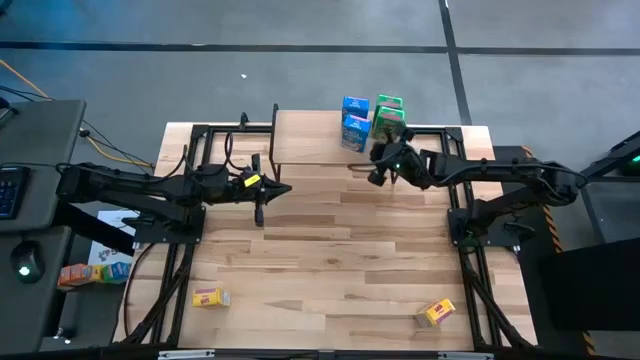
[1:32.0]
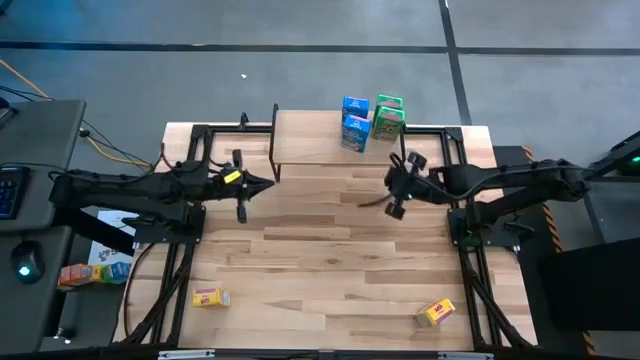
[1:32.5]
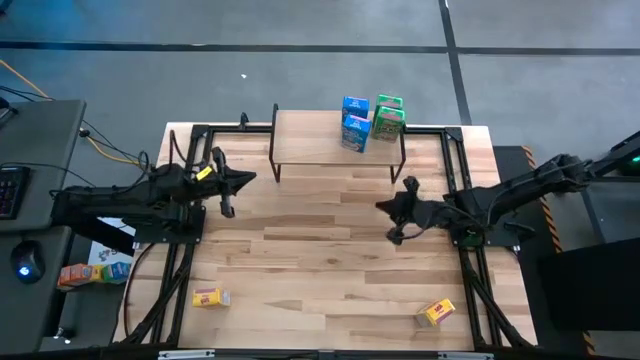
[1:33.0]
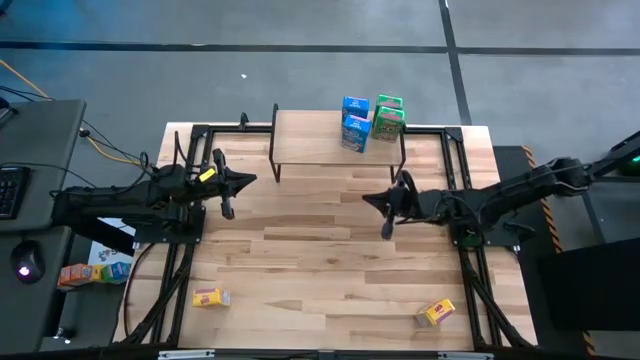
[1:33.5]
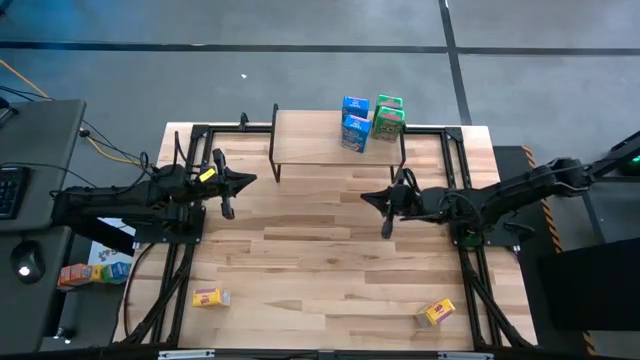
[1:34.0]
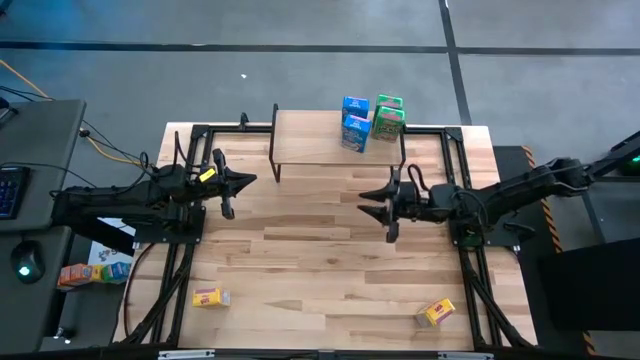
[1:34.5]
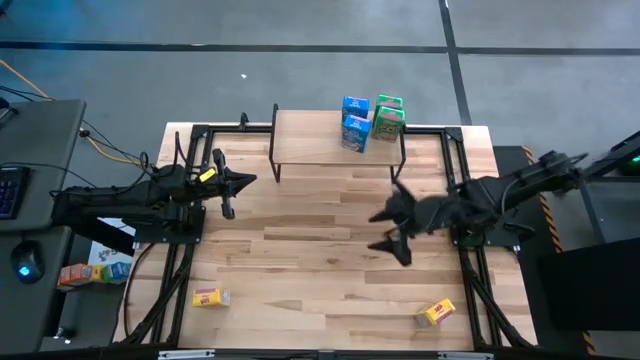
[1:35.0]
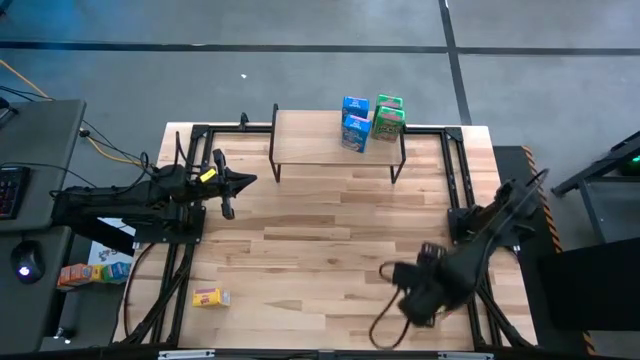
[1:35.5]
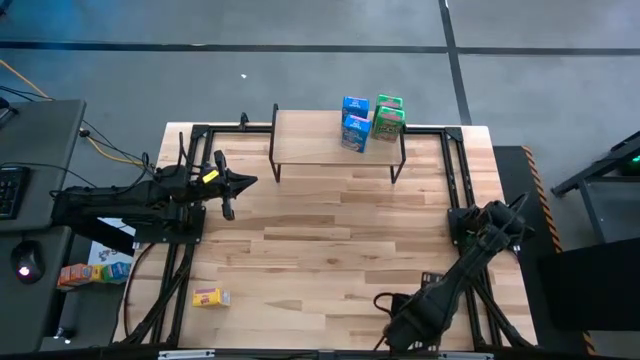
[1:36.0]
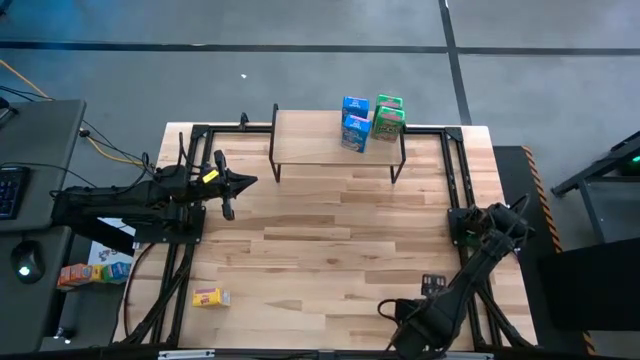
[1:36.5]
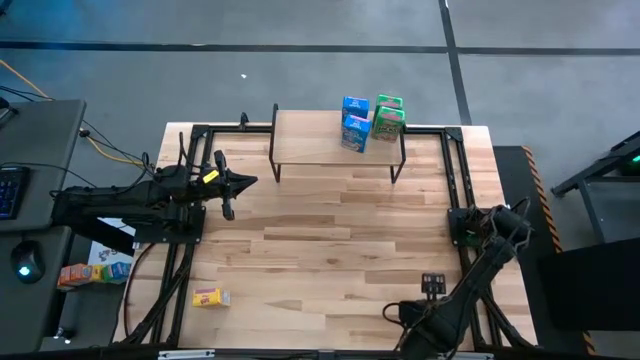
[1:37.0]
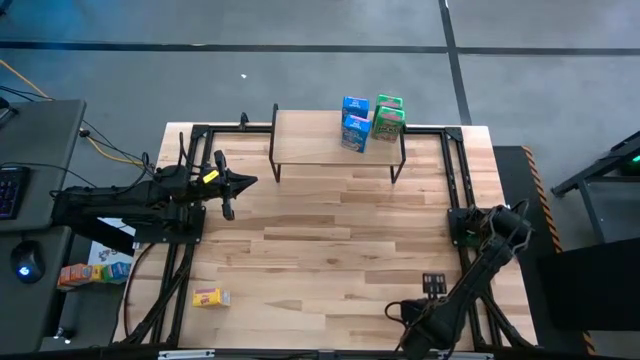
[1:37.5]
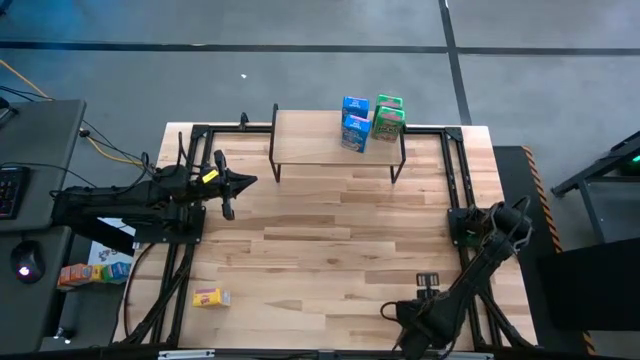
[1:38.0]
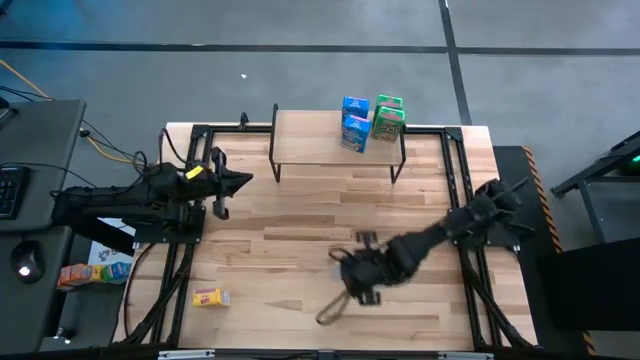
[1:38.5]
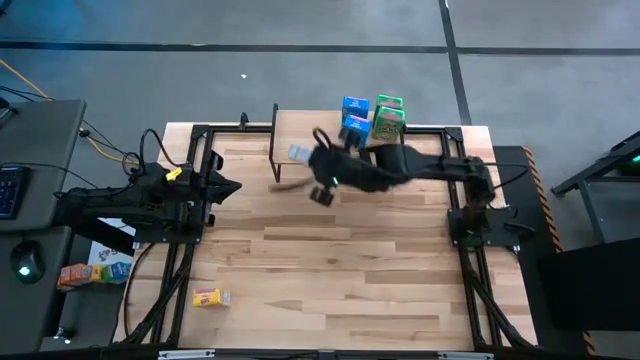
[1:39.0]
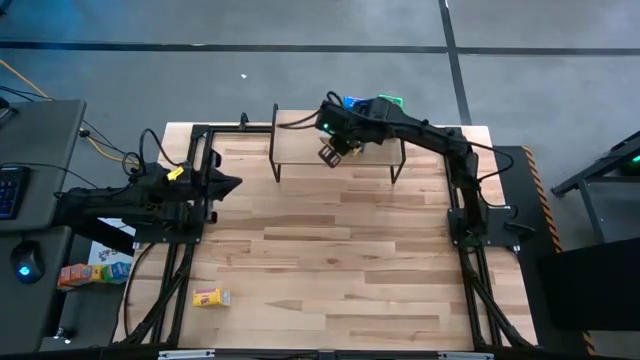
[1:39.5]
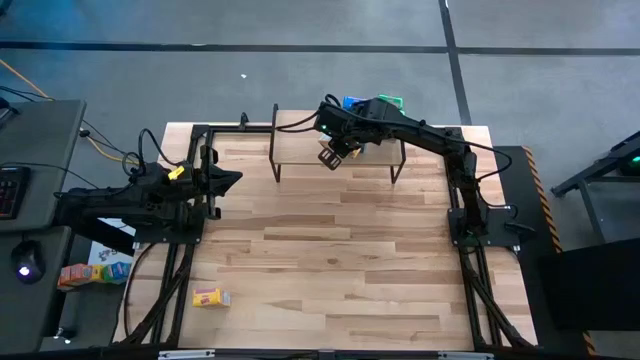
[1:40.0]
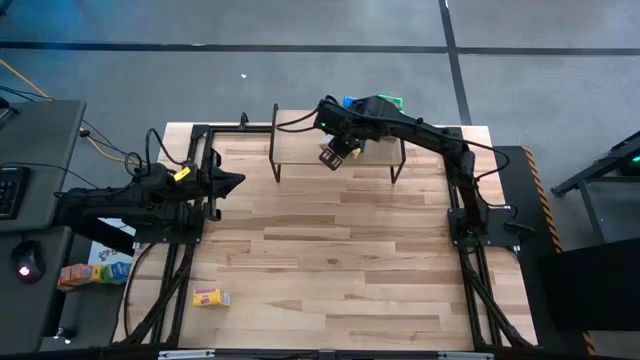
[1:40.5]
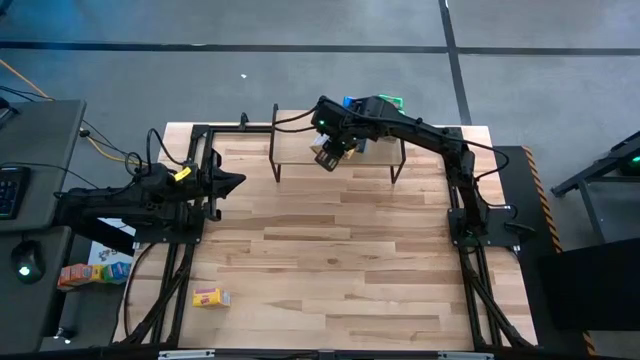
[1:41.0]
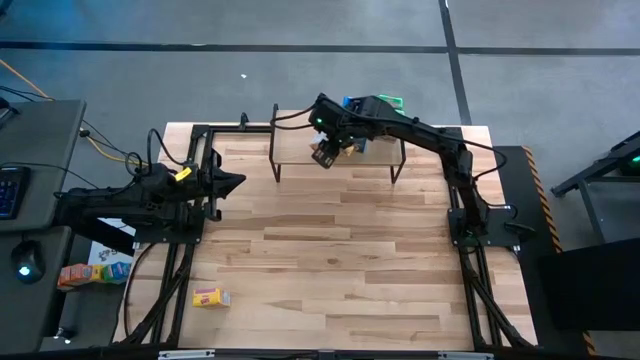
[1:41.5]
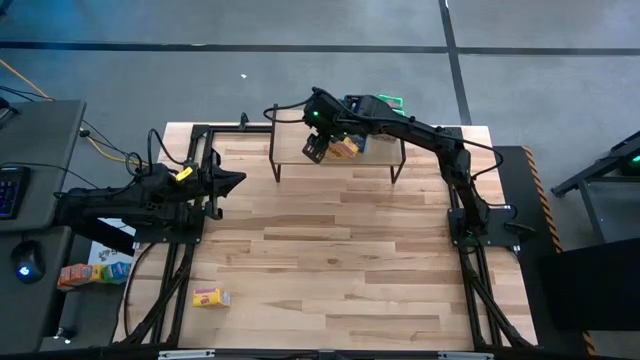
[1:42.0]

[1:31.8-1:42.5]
Task: Stack cereal on shelf
Put the right yellow cereal box on the shelf

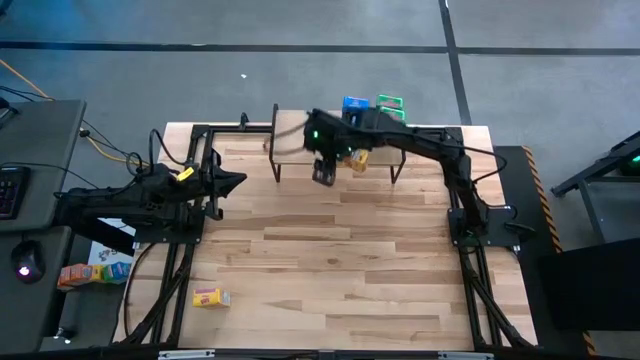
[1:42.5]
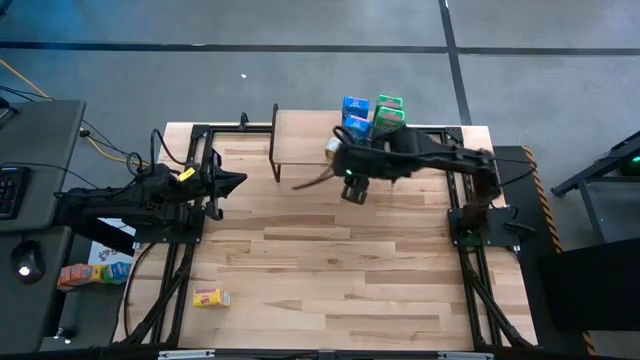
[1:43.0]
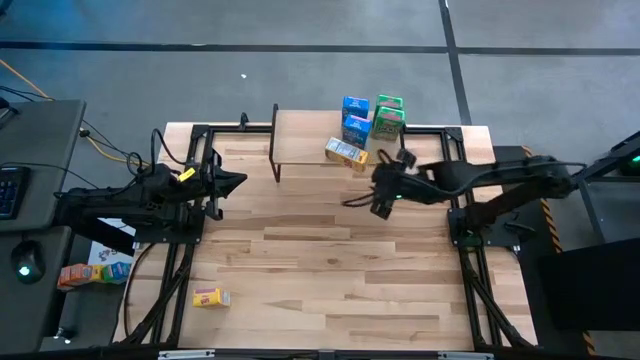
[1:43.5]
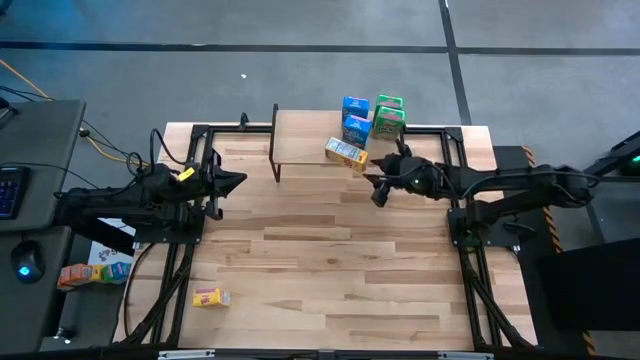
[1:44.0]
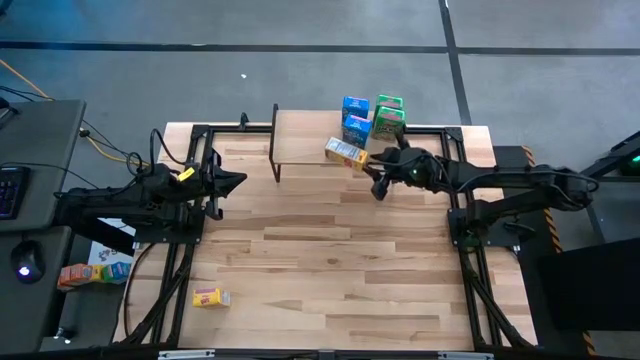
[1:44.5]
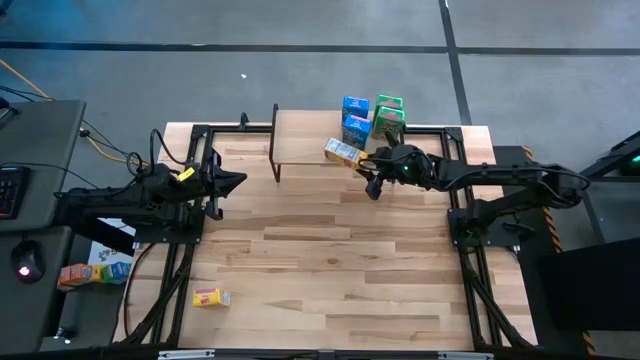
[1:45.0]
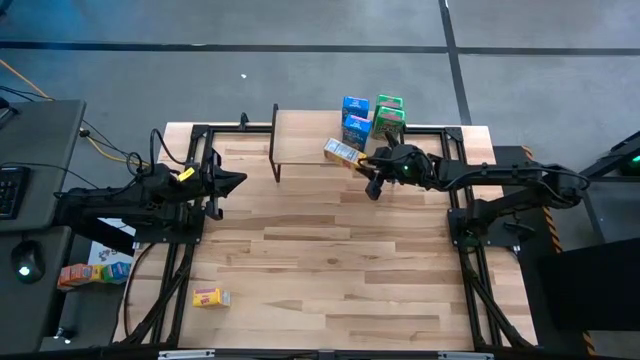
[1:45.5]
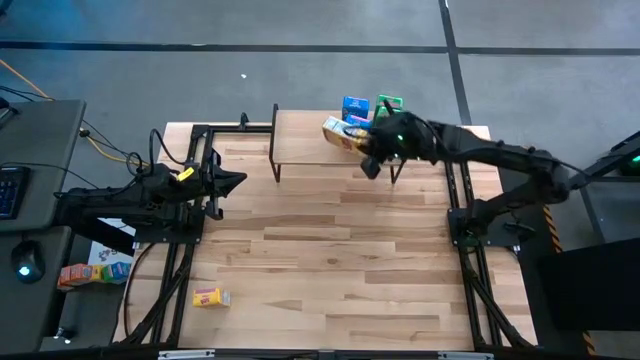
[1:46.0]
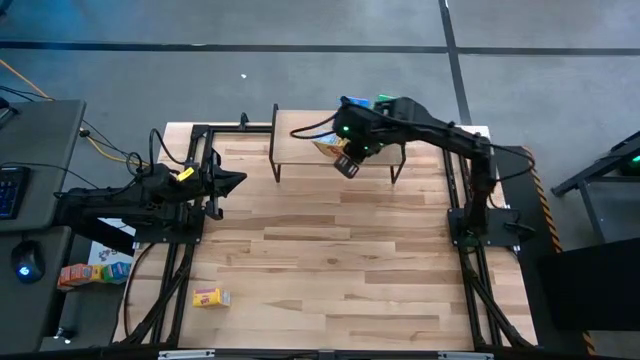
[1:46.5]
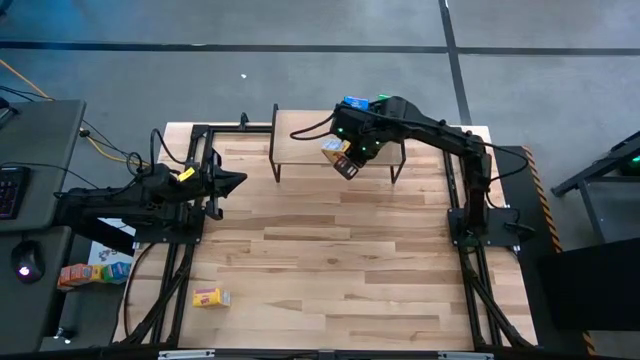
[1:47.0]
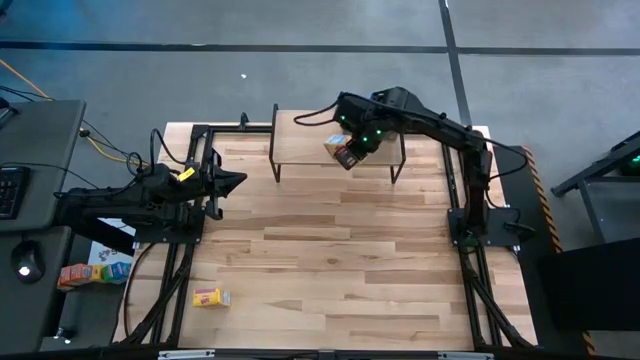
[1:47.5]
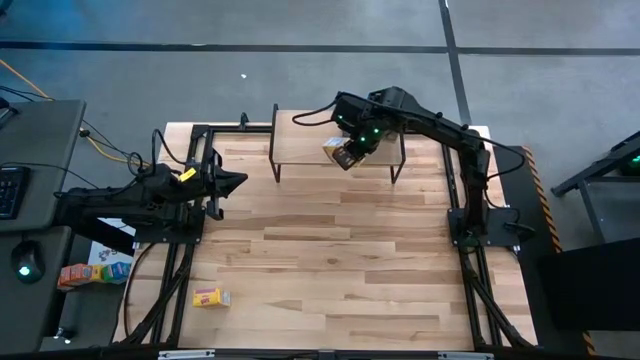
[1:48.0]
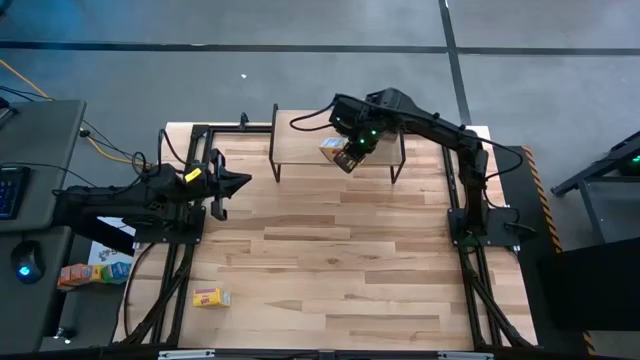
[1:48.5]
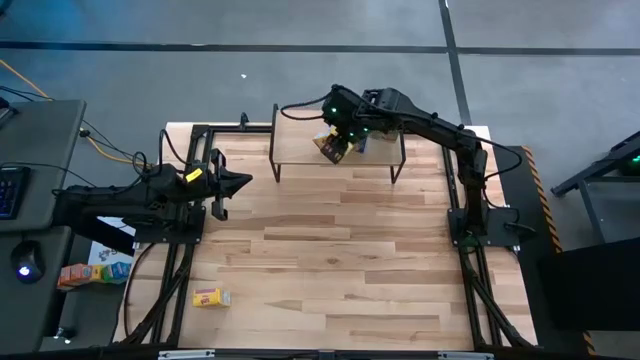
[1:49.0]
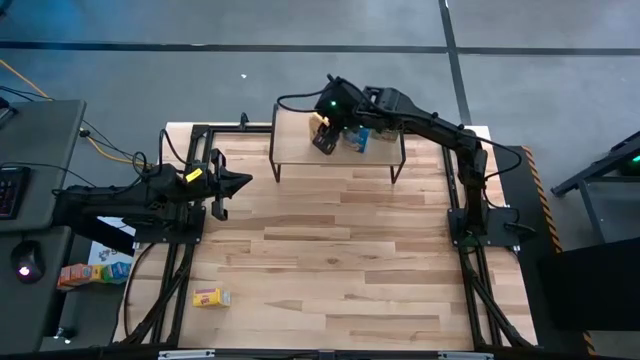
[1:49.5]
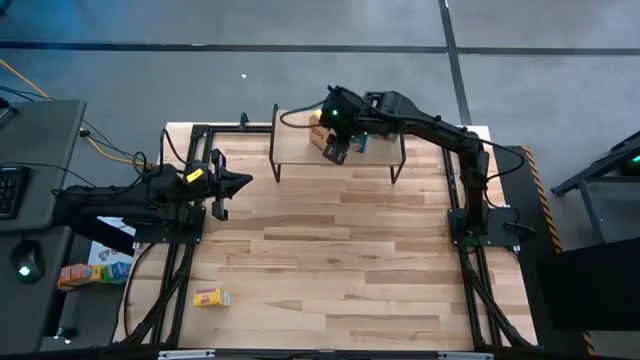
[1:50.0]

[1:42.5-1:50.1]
Put the right yellow cereal box on the shelf

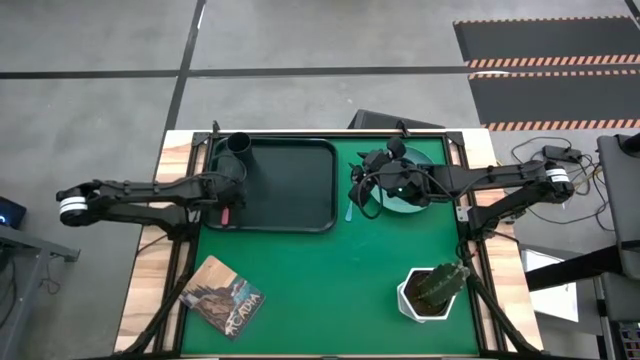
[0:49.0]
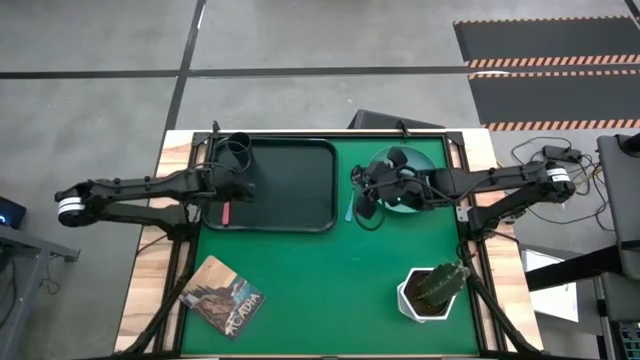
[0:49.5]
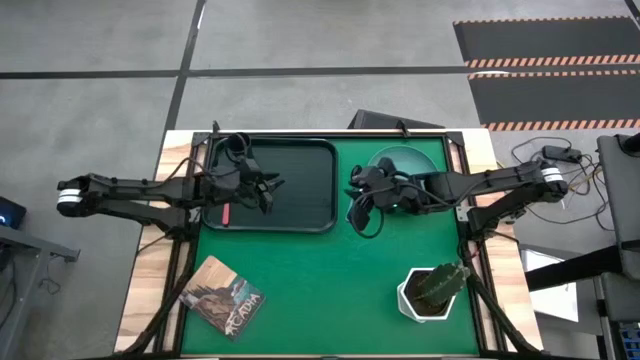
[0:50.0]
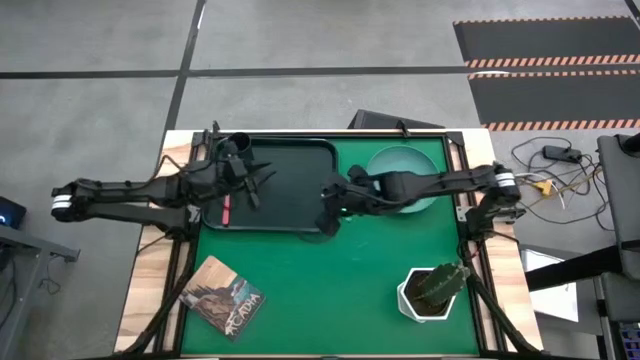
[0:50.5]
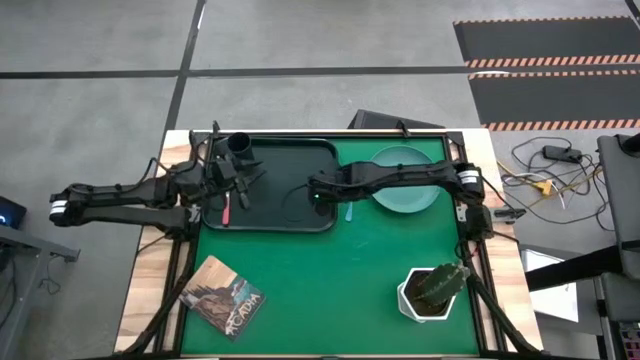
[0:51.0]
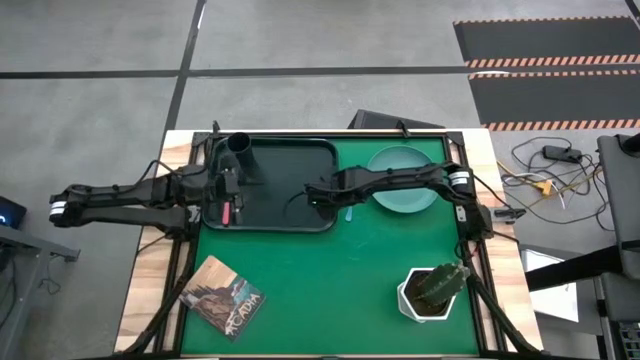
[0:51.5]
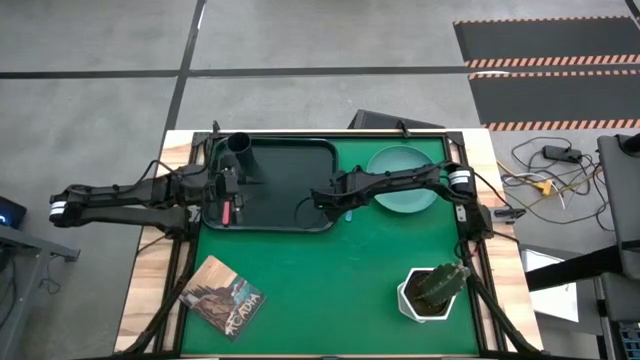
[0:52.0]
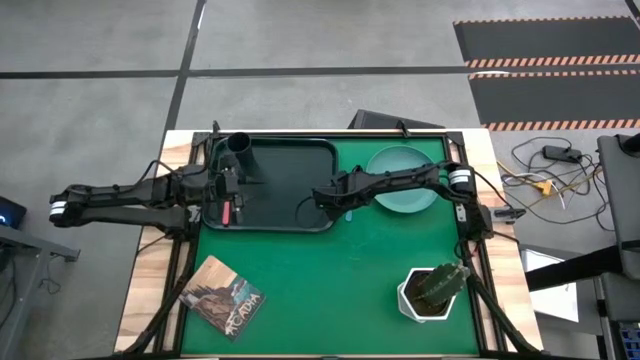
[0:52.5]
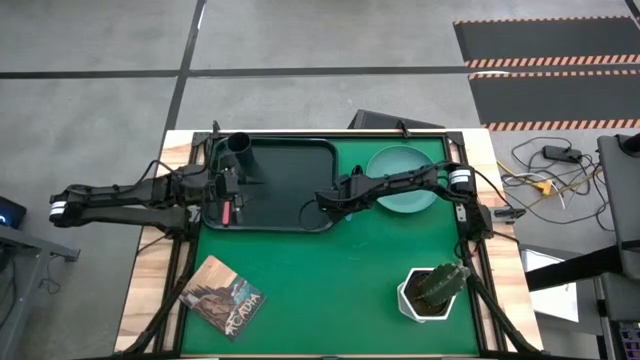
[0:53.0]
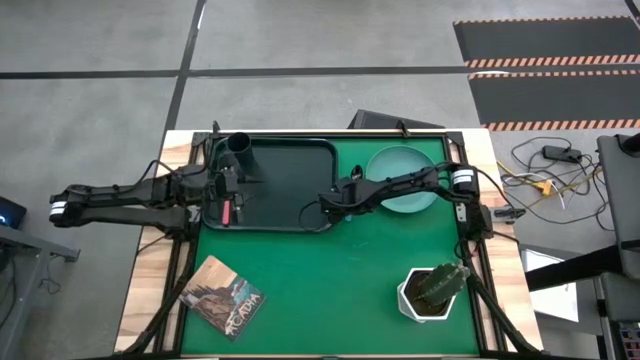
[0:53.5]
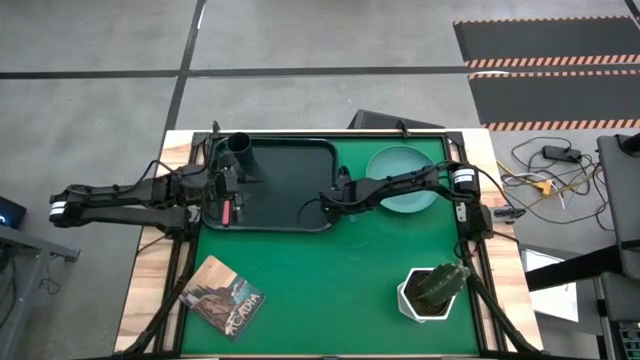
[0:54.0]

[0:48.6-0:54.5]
Task: Pick and place plate/cup/fork/spoon on tray
Put the blue spoon on the black serving tray to the right of the pink fork
